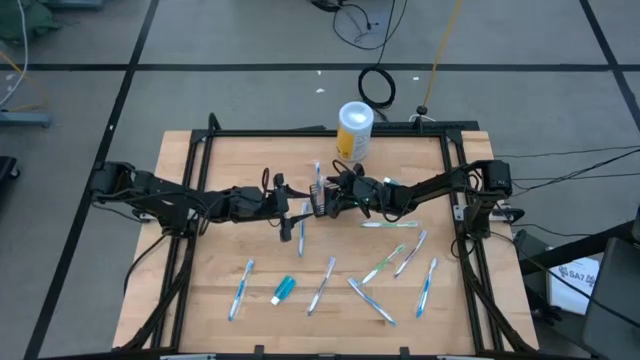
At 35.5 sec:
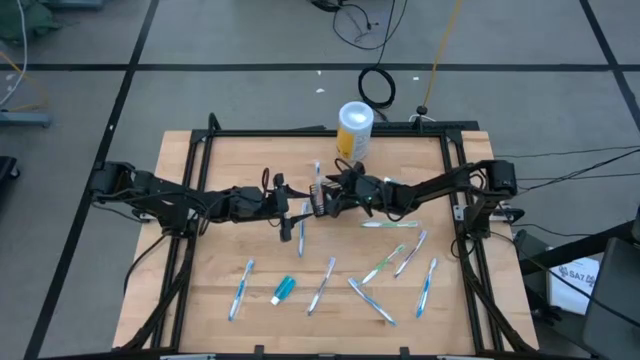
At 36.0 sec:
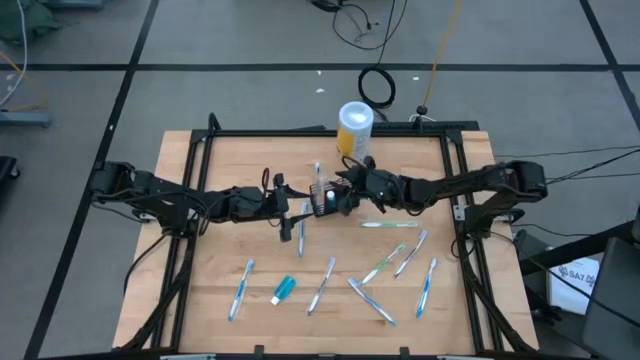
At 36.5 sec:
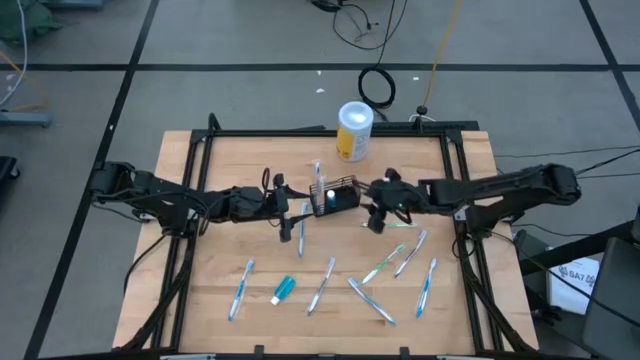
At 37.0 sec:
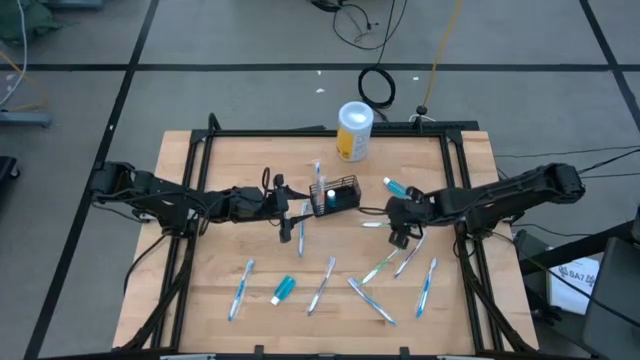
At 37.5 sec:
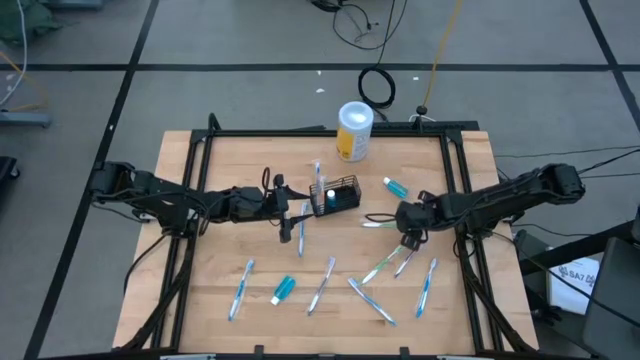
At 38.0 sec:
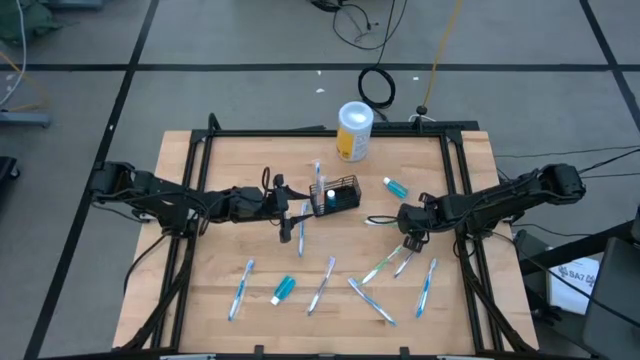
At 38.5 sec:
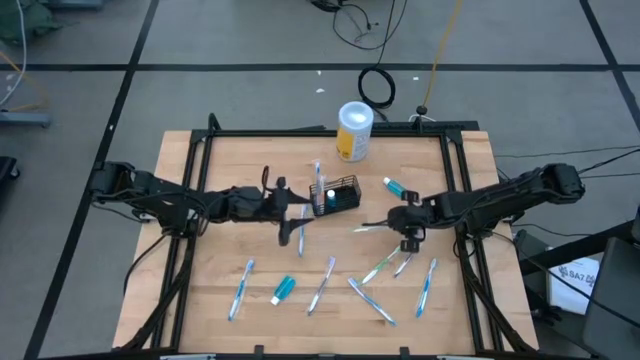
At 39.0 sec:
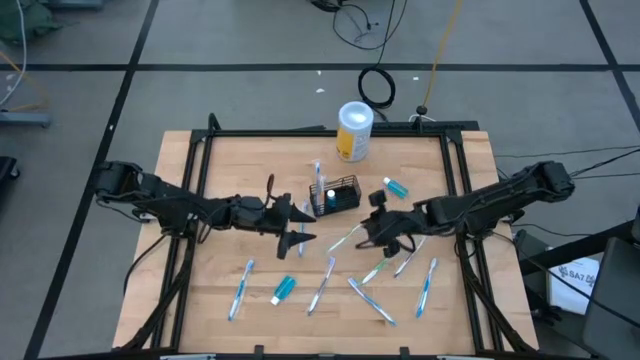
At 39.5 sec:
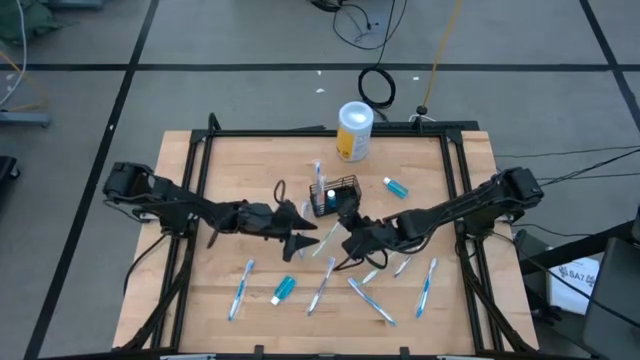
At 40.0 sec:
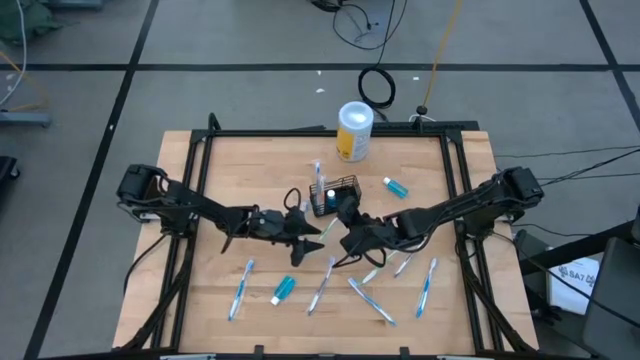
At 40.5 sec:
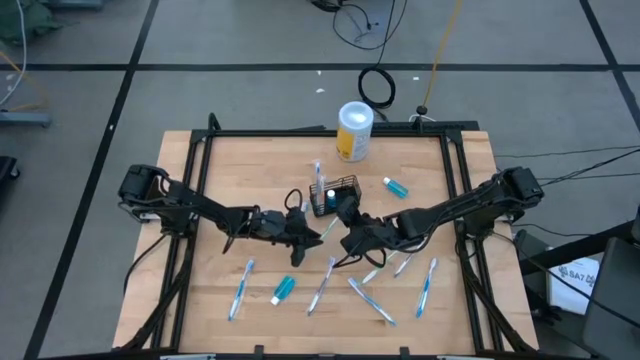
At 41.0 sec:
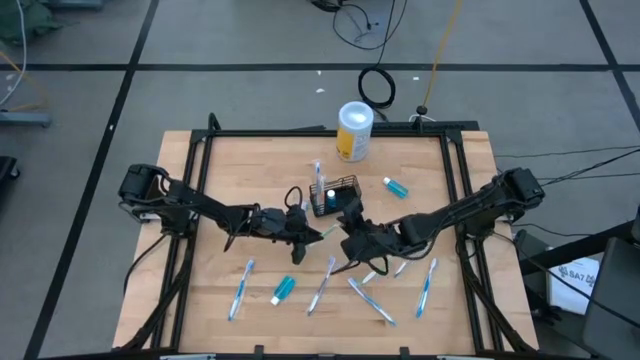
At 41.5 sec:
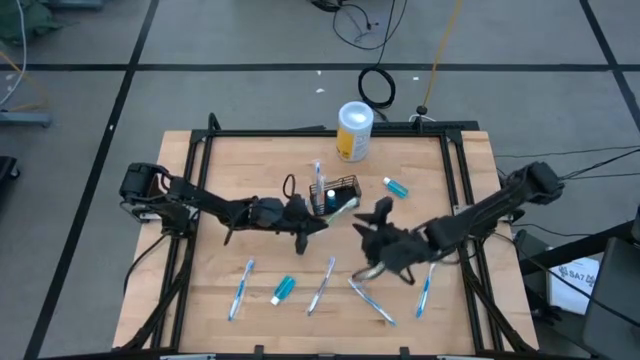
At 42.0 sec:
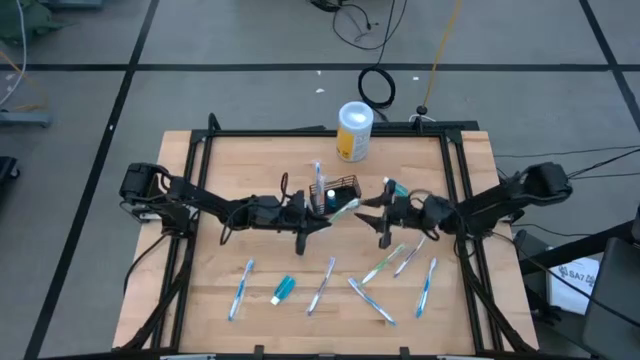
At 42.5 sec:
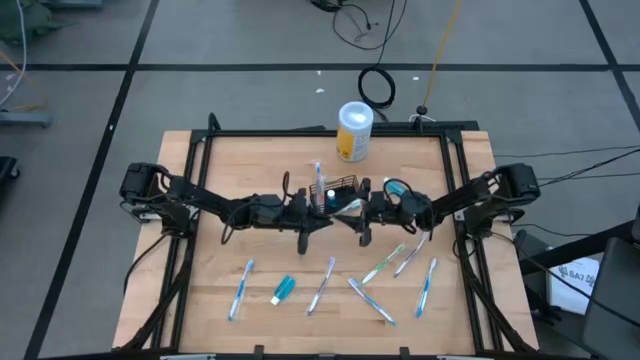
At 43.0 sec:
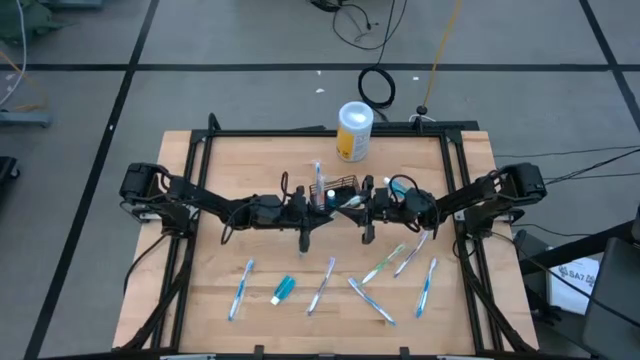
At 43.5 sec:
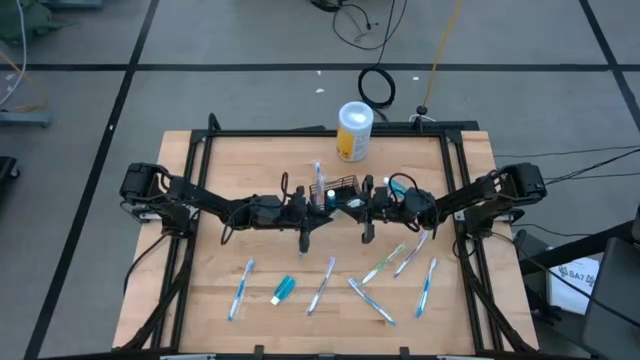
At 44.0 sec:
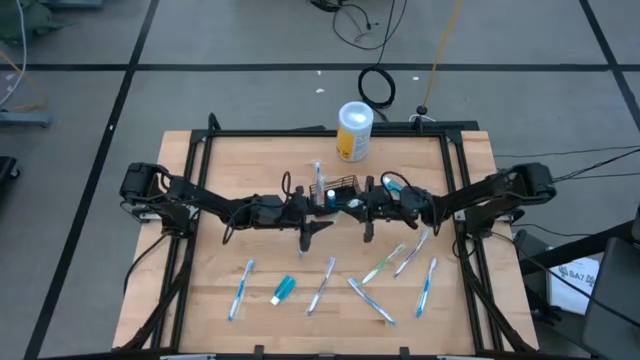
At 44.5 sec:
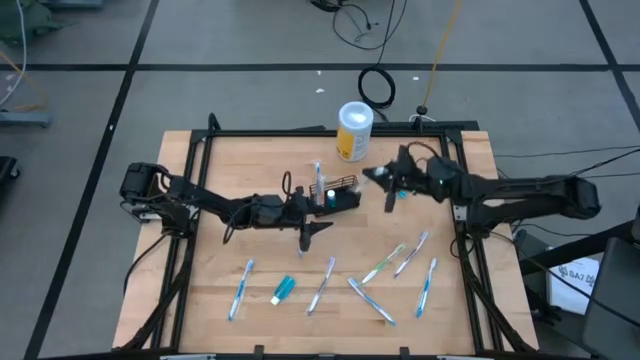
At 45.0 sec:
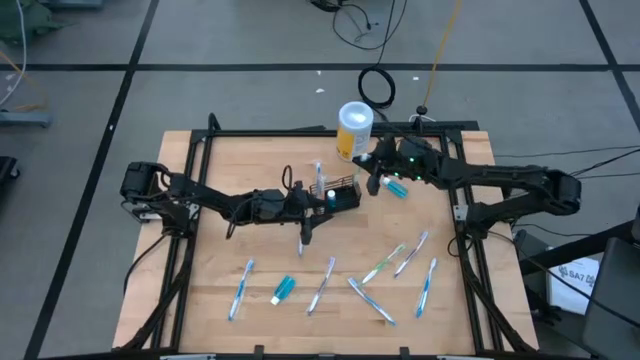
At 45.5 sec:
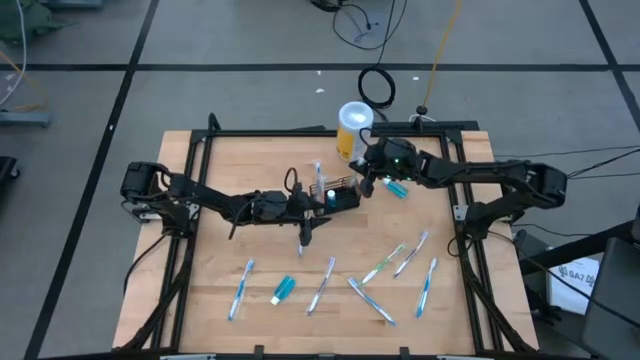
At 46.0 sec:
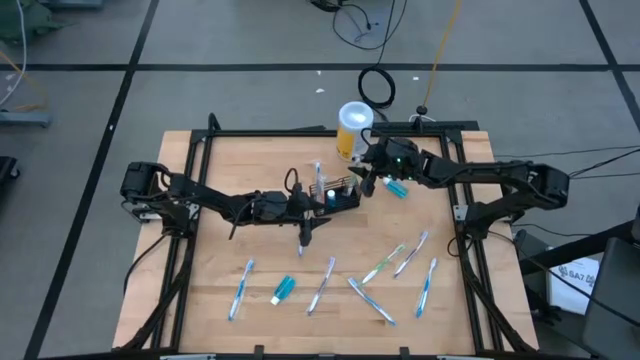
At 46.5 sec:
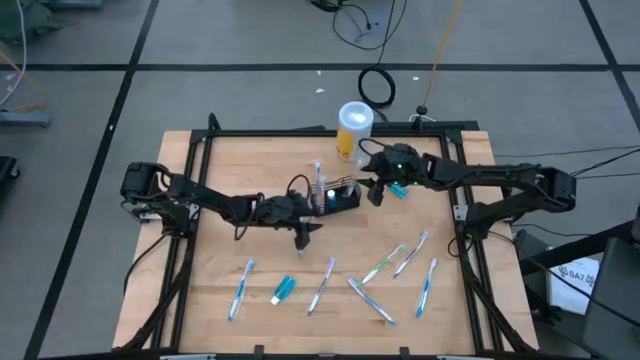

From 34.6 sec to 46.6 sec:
Task: Pick & Place toothbrushing station
Put the green toothbrush into the black wire organizer

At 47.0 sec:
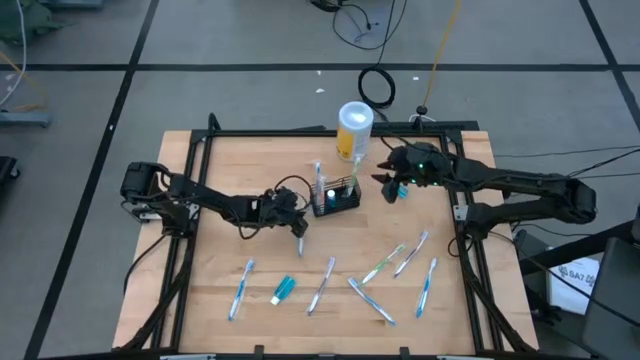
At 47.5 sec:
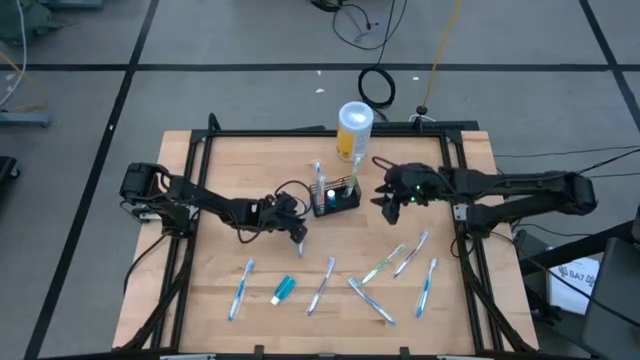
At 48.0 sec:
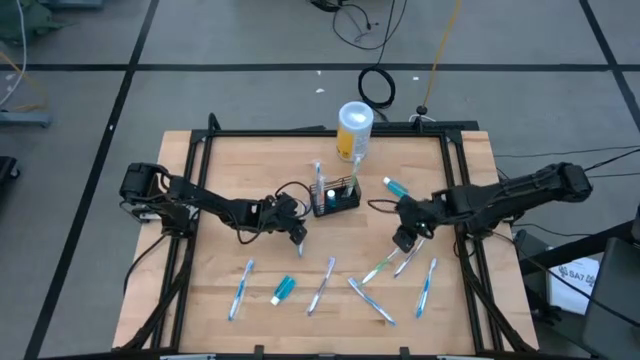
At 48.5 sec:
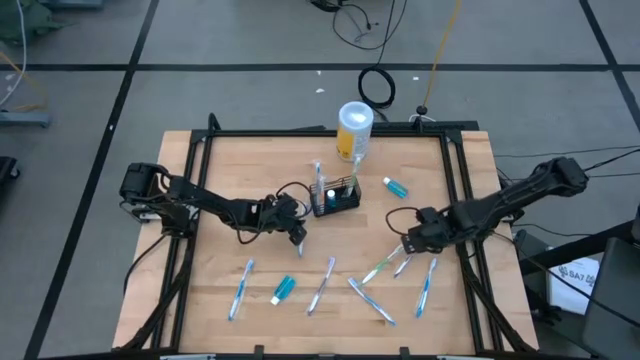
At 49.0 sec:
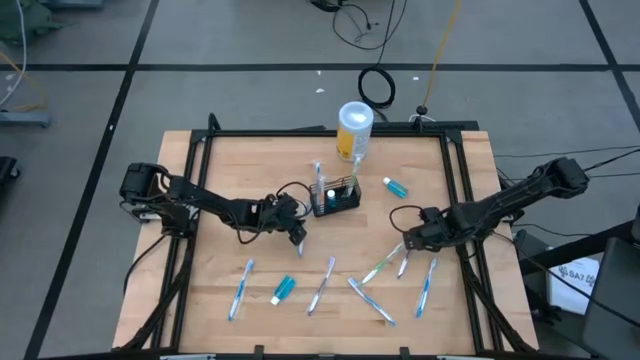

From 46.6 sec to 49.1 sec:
Put the purple toothbrush into the black wire organizer

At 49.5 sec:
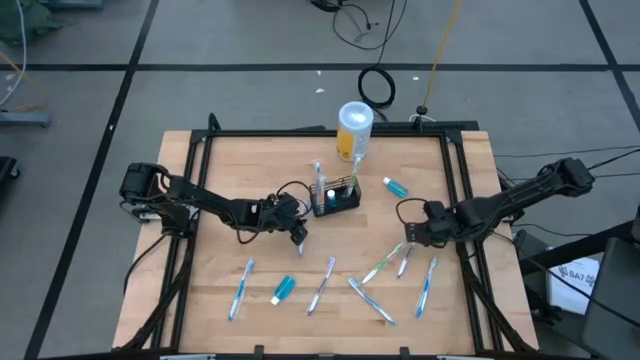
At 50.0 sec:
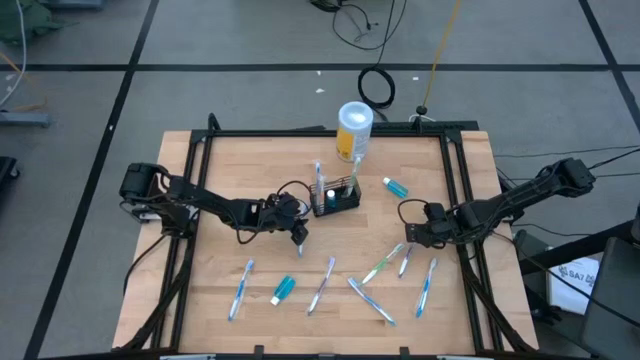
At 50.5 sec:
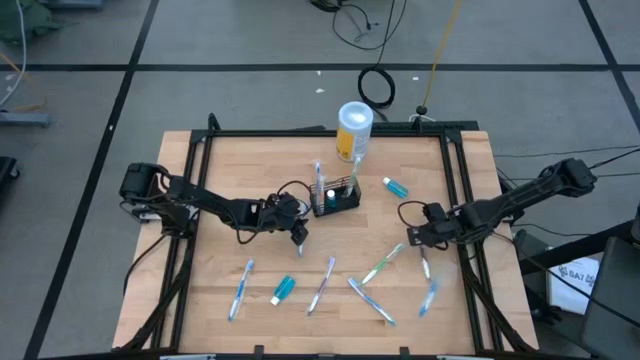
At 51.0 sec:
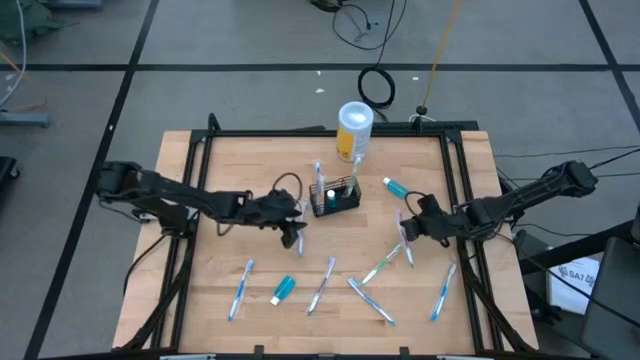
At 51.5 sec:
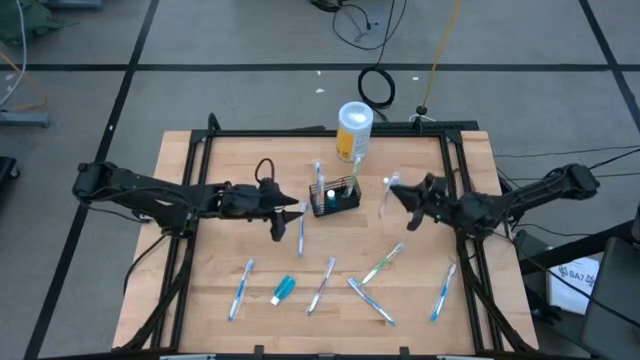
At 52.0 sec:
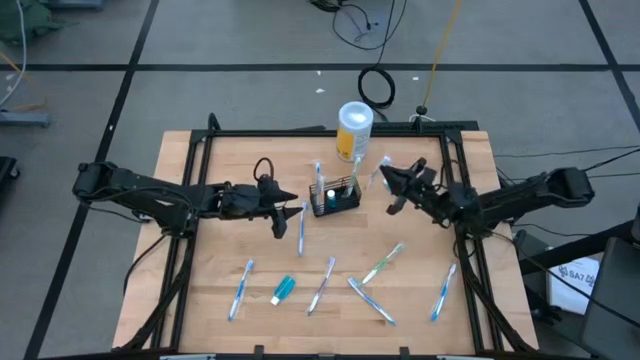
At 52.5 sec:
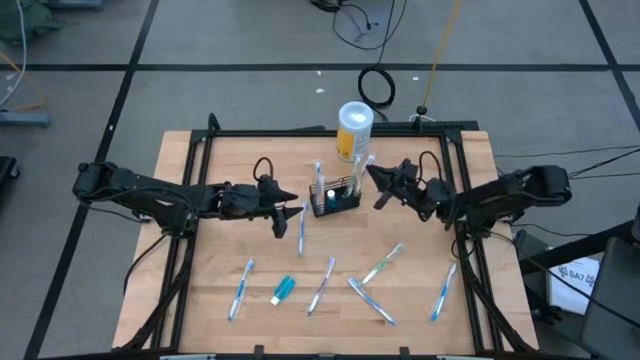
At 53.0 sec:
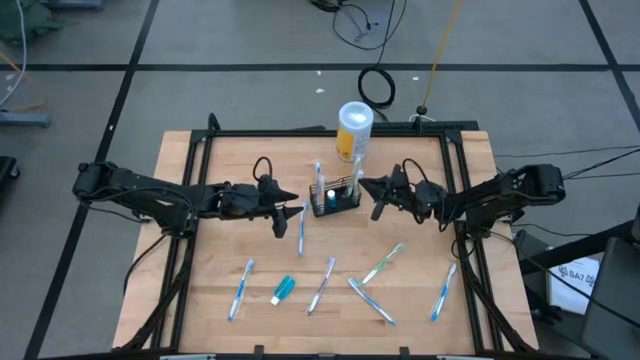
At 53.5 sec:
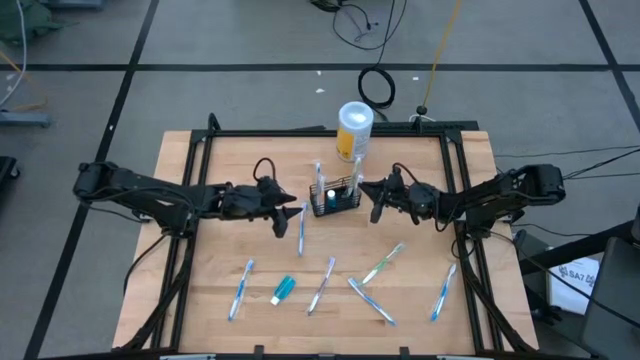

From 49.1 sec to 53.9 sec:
Put the purple toothbrush into the black wire organizer

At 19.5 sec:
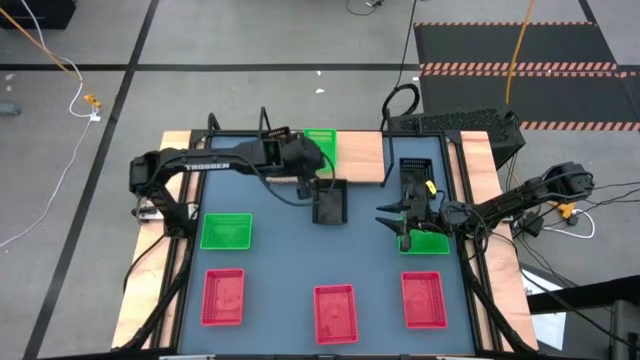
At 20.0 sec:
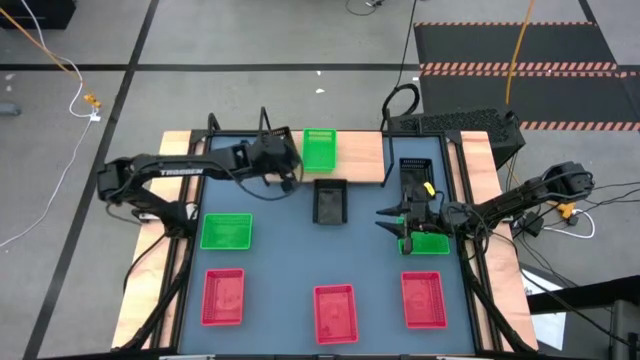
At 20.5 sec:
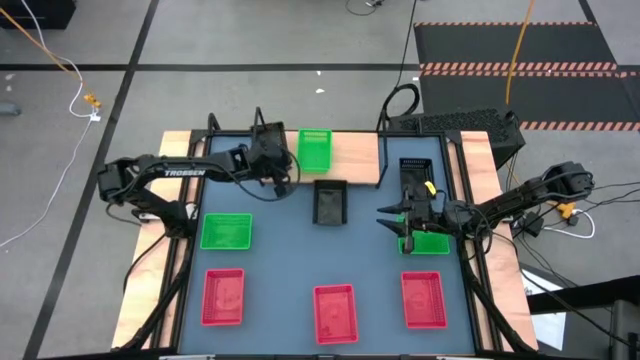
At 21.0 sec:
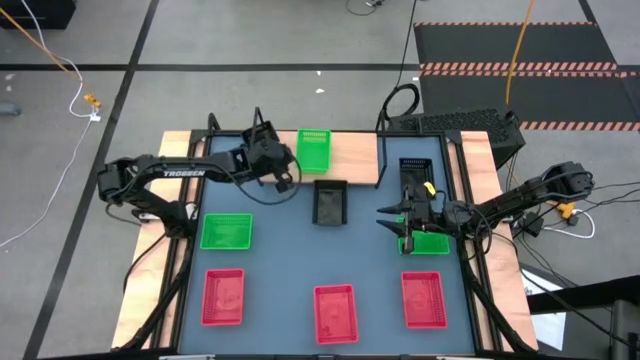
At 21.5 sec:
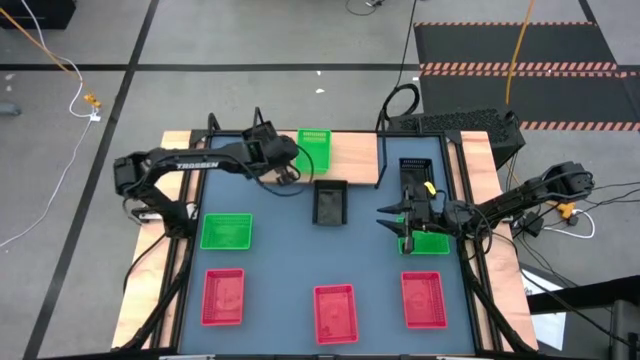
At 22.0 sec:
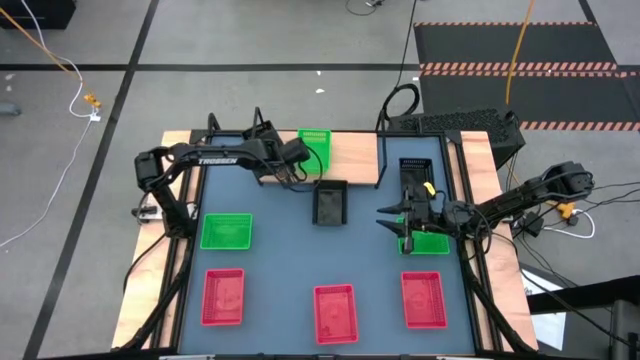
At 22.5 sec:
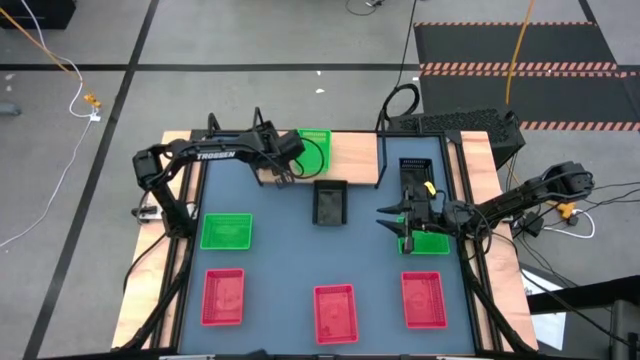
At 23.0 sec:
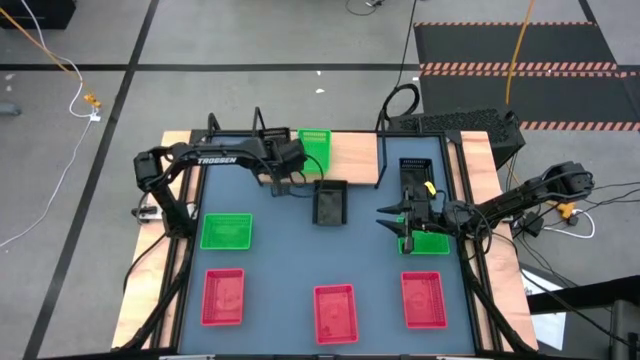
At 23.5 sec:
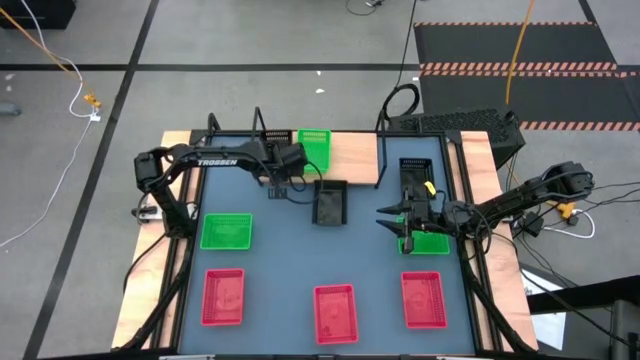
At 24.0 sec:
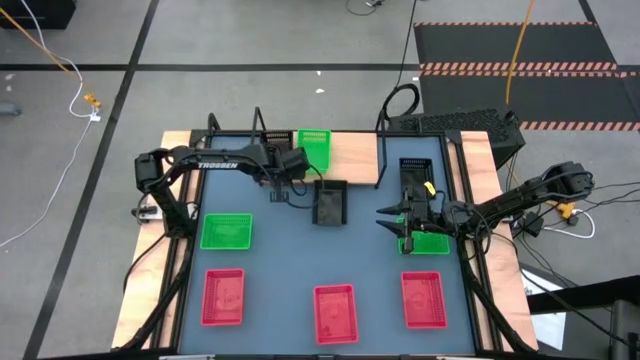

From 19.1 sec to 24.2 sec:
Task: Stack baskets on shelf by color
Adjust the black bin on the shelf
